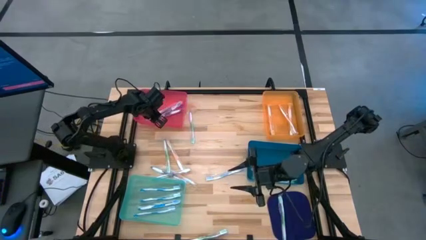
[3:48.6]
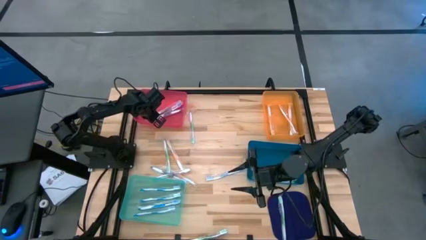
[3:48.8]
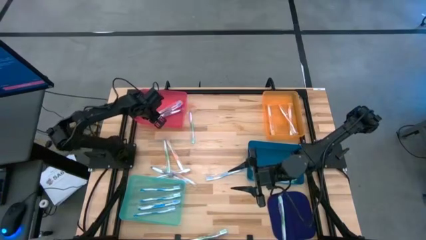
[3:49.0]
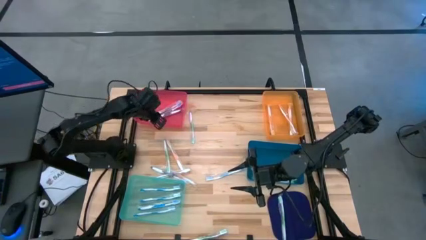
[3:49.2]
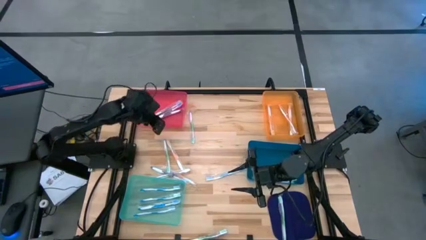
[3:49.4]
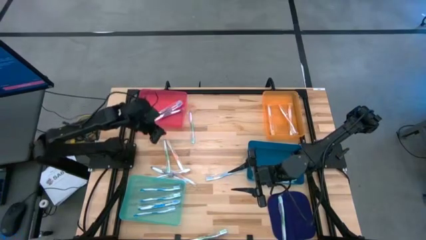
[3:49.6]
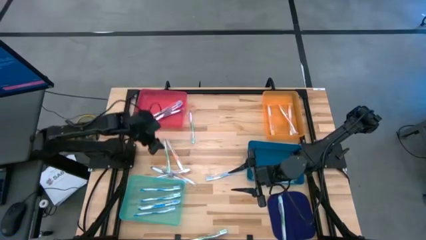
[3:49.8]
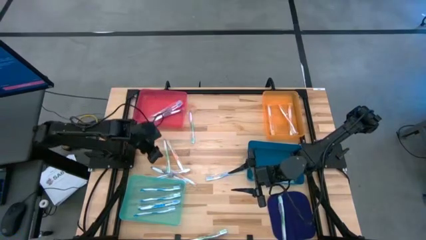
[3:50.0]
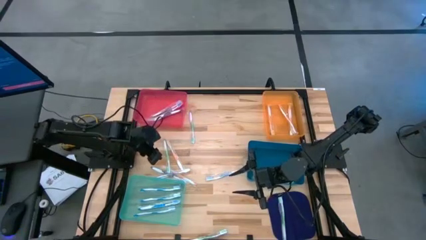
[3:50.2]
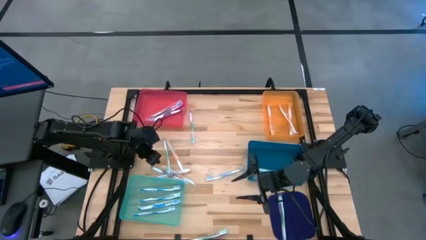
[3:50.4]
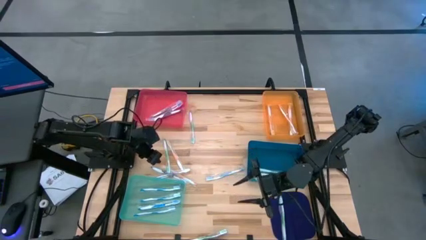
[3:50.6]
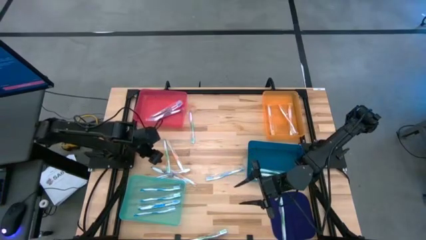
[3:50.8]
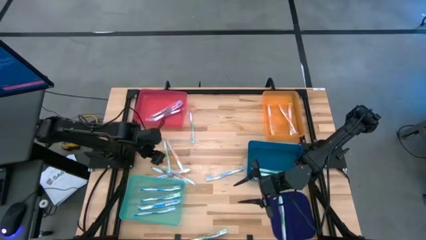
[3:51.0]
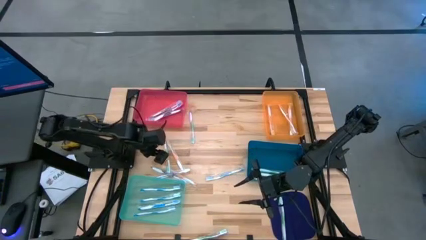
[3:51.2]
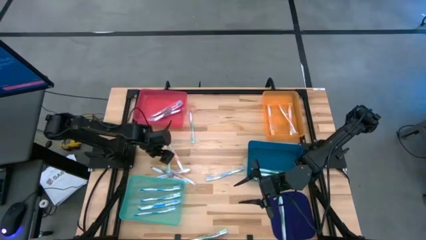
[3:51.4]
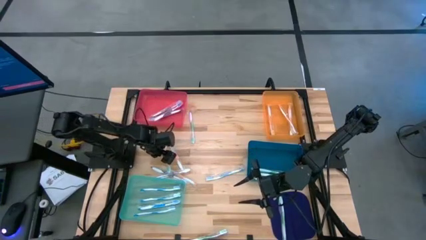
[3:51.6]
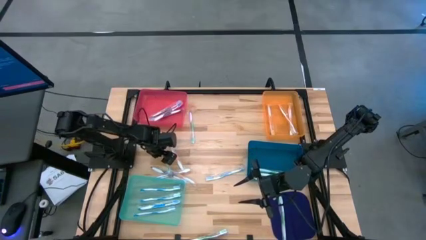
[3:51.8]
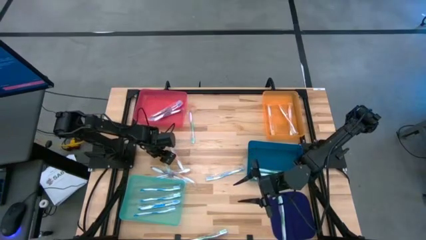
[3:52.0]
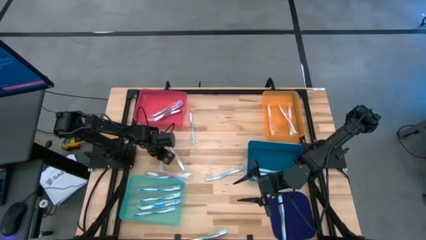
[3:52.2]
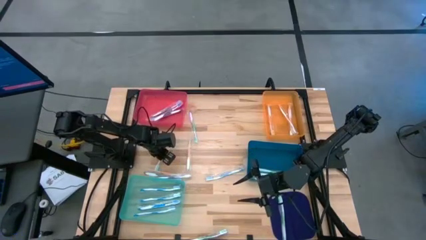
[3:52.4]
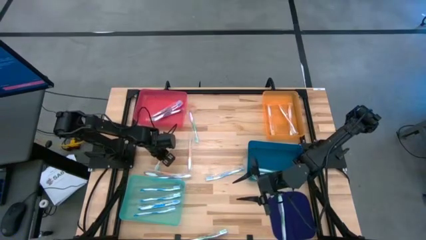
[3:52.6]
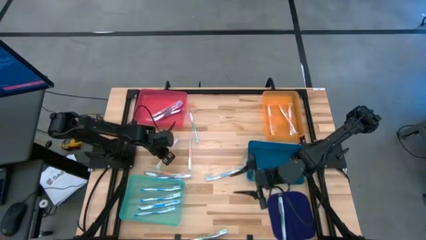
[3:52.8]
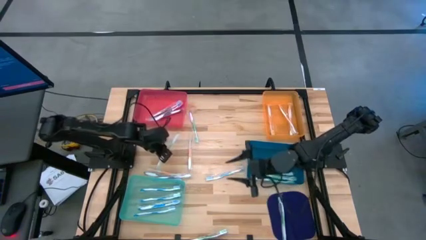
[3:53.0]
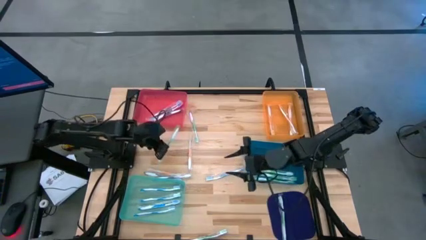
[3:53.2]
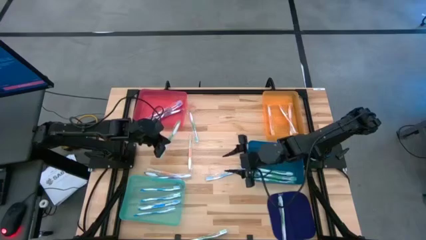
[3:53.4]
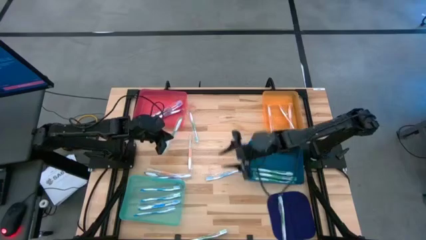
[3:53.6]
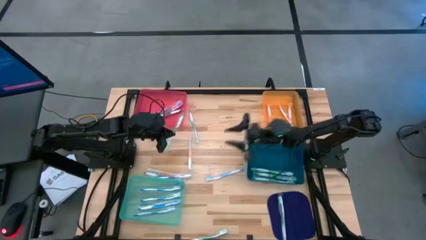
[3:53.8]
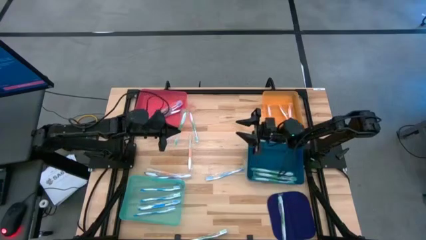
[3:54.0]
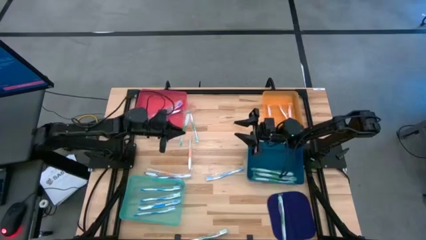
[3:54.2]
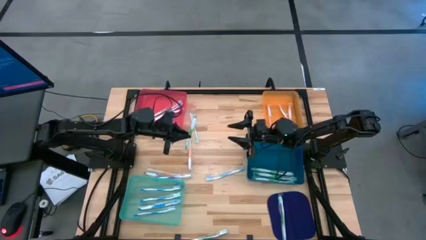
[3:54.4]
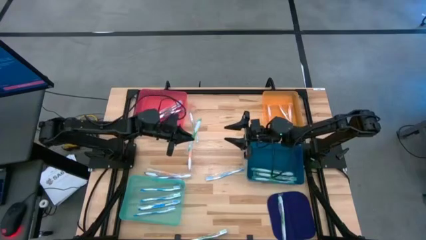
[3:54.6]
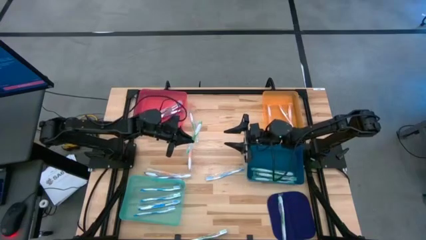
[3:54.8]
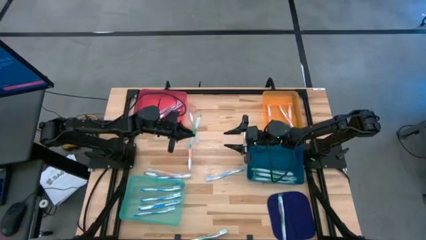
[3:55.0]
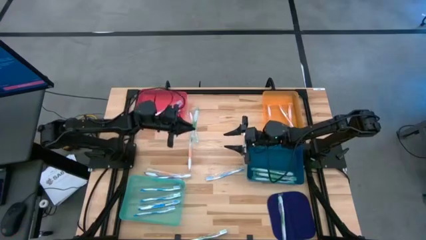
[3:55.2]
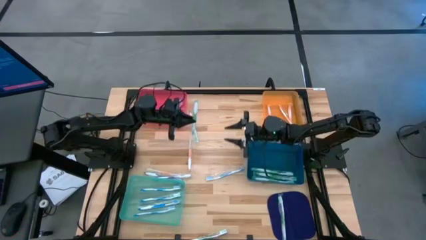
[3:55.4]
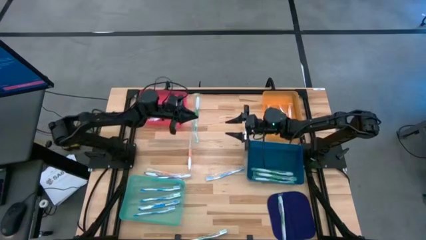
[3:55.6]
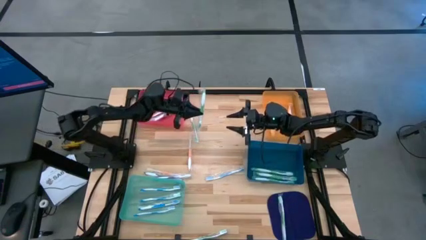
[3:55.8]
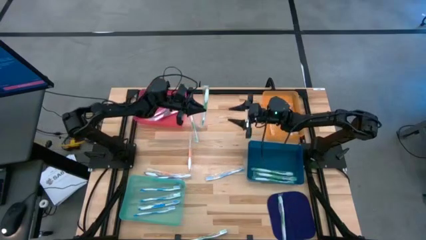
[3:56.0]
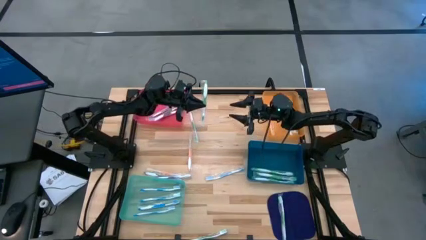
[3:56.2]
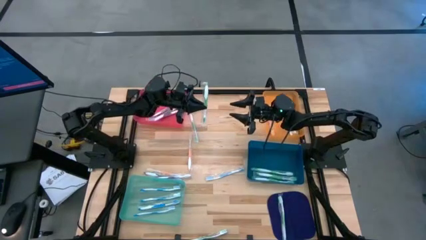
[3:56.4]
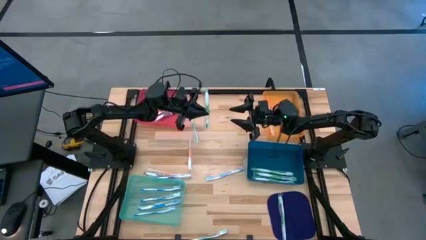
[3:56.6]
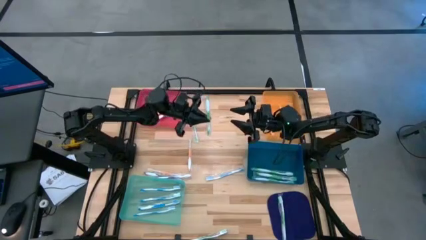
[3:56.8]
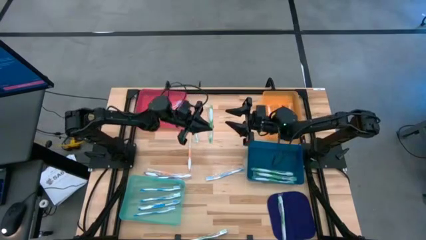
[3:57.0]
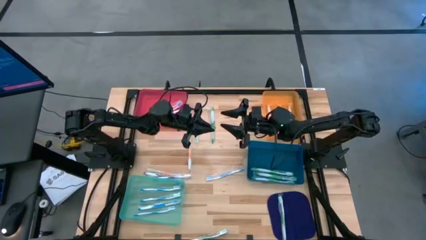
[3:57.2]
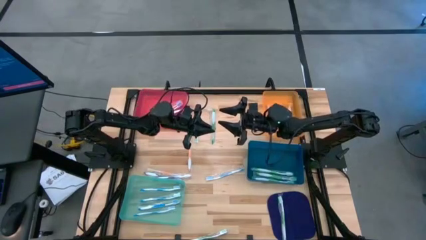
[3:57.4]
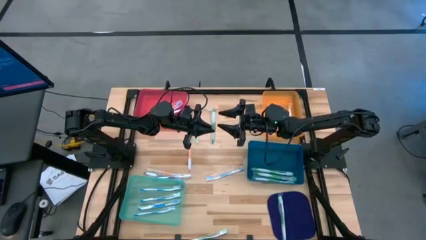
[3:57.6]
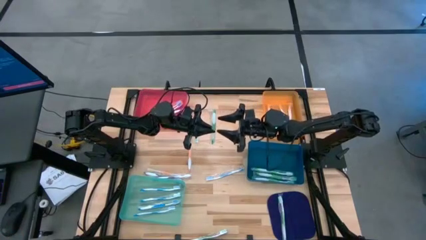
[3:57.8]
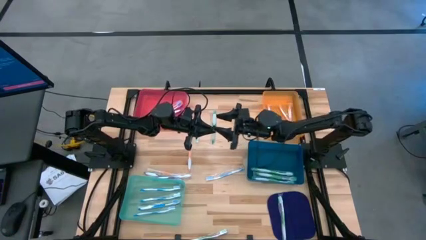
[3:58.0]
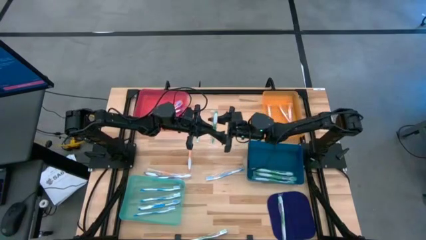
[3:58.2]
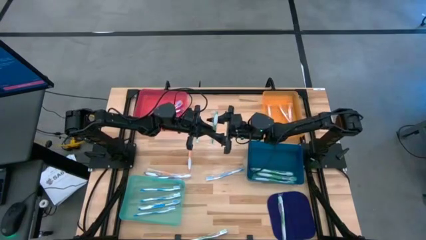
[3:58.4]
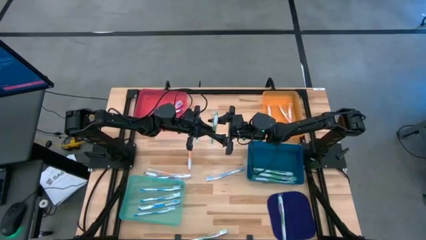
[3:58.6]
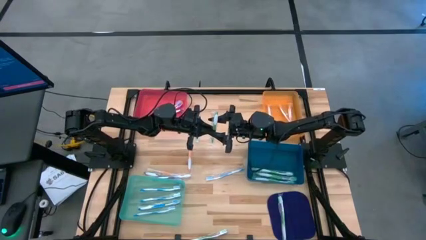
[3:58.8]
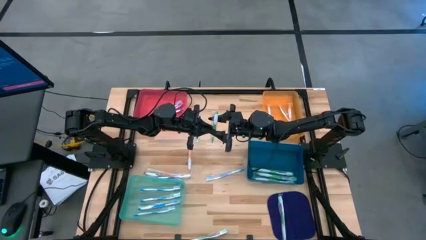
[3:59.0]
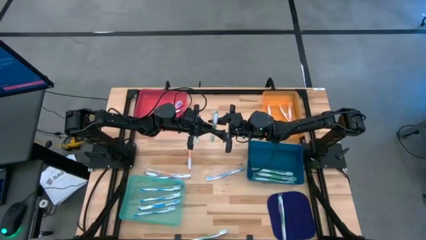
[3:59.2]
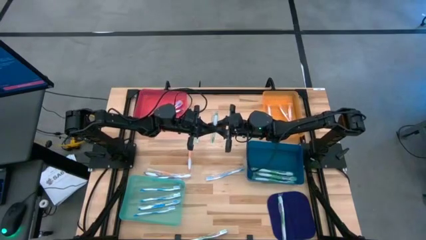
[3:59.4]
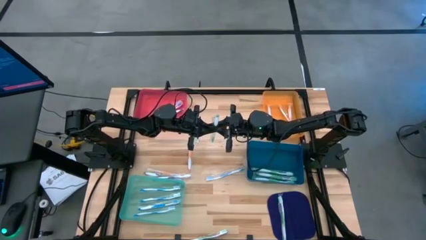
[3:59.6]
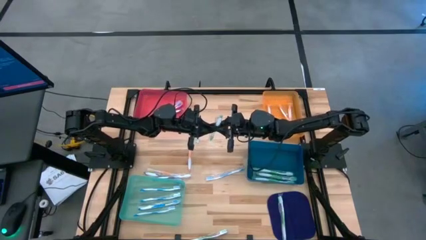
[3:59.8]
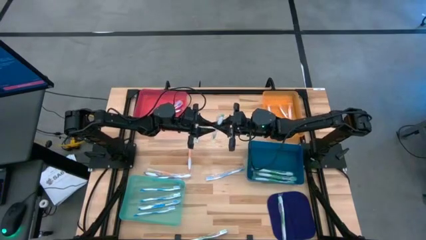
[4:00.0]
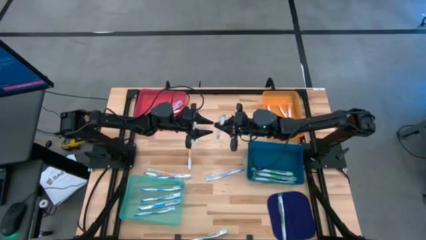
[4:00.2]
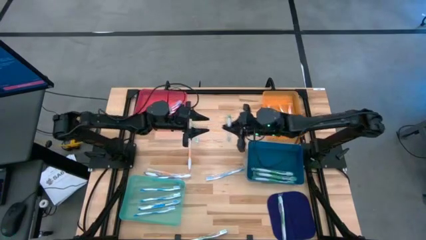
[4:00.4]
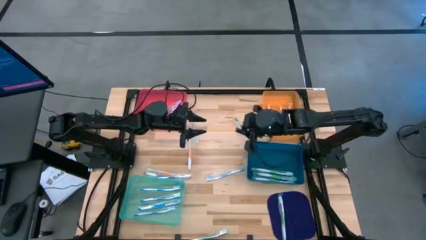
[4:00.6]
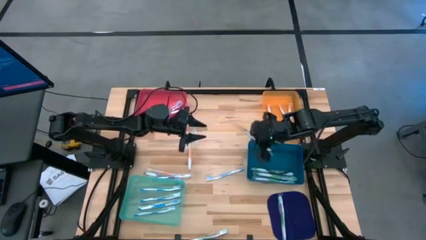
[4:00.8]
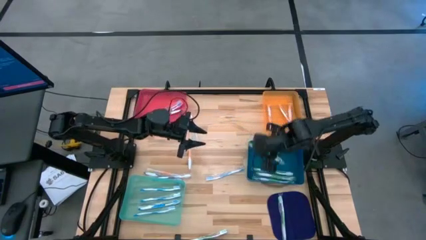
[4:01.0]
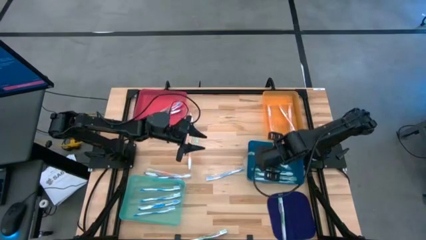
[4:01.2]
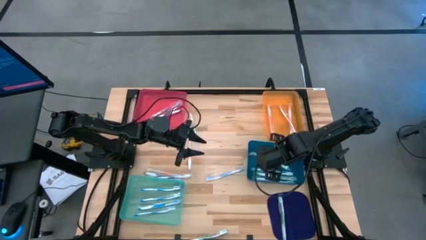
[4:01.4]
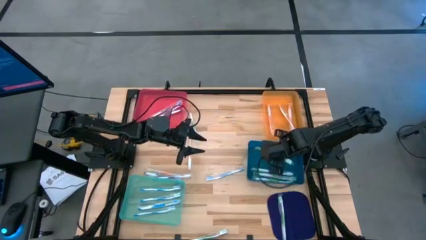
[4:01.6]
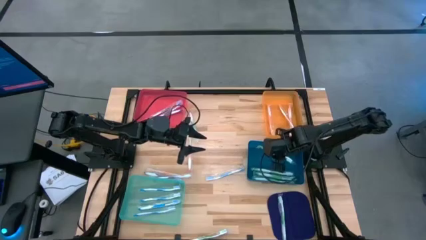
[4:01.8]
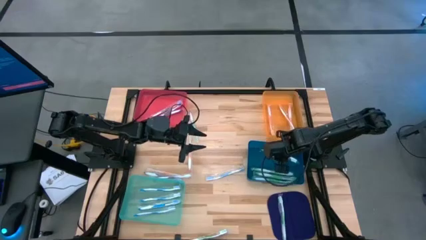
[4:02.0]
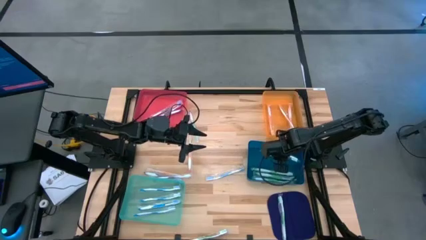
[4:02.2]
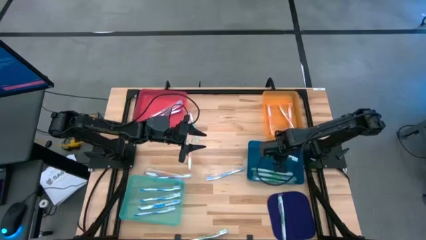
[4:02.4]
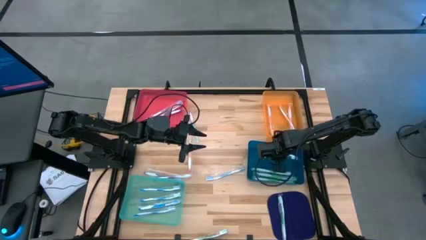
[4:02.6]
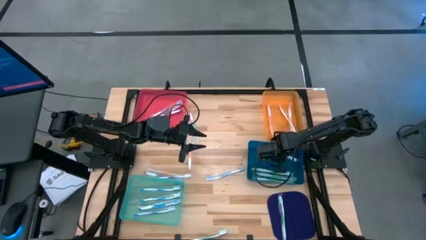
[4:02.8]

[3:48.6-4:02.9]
Task: Pick & Place Toothbrushes
Put the green toothbrush into the blue bin
